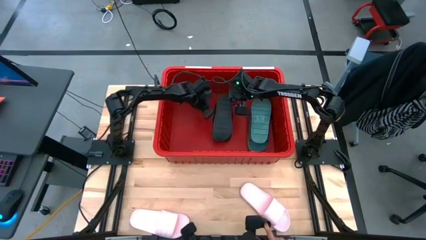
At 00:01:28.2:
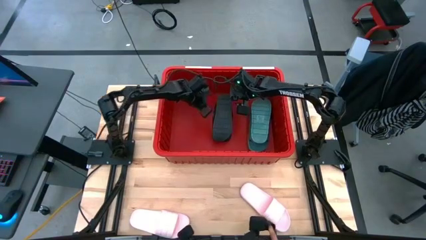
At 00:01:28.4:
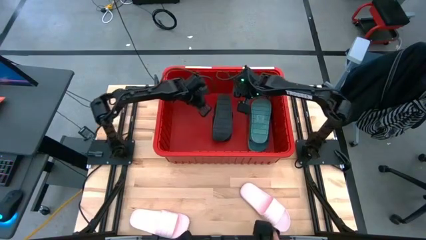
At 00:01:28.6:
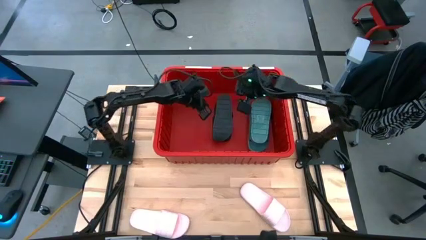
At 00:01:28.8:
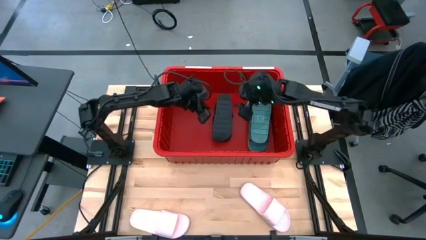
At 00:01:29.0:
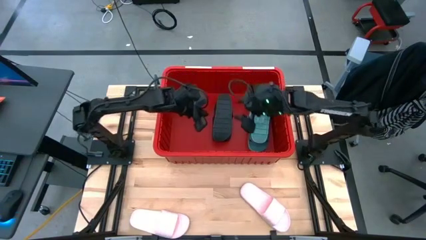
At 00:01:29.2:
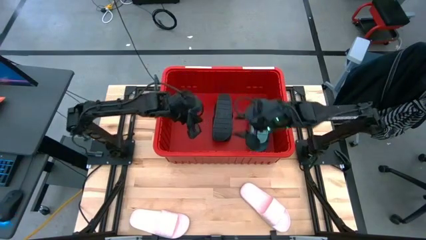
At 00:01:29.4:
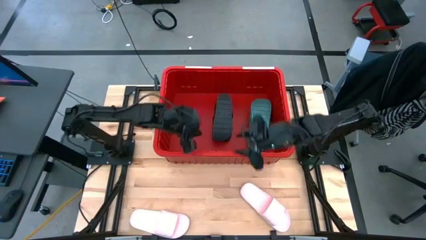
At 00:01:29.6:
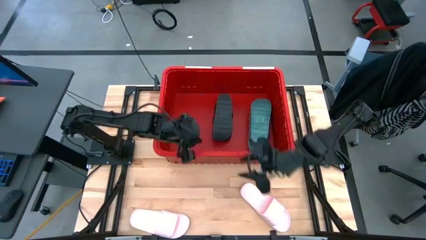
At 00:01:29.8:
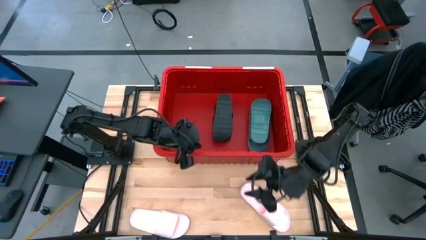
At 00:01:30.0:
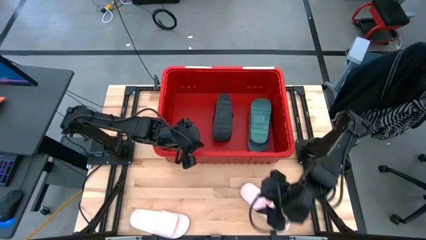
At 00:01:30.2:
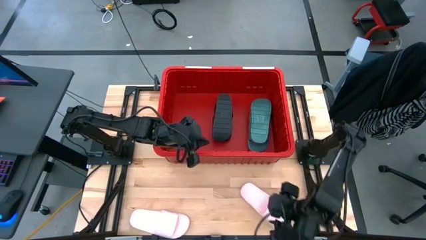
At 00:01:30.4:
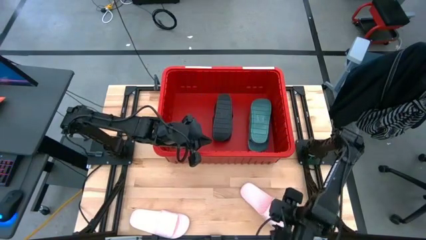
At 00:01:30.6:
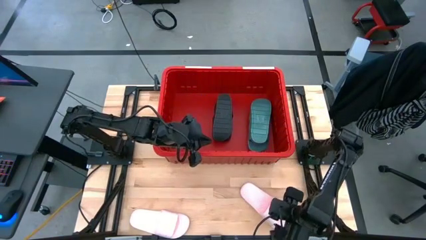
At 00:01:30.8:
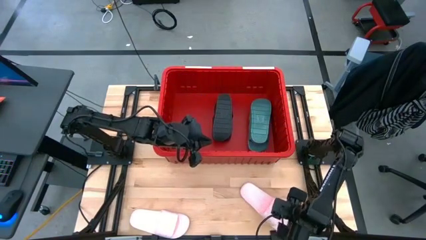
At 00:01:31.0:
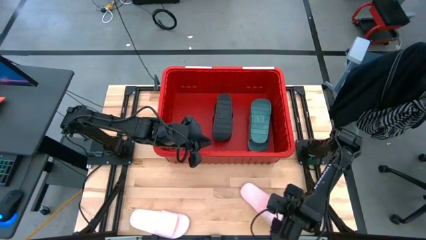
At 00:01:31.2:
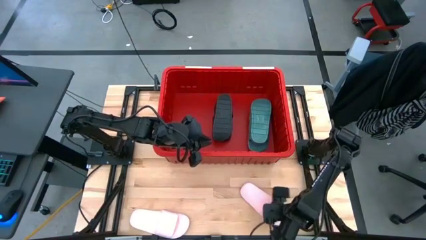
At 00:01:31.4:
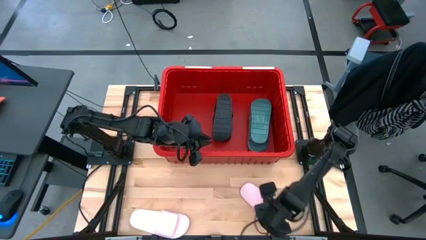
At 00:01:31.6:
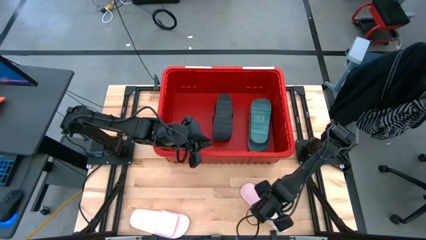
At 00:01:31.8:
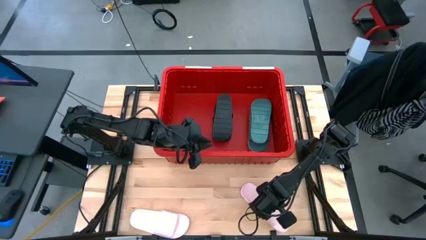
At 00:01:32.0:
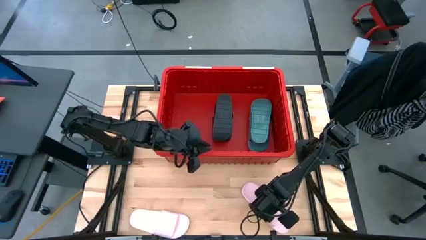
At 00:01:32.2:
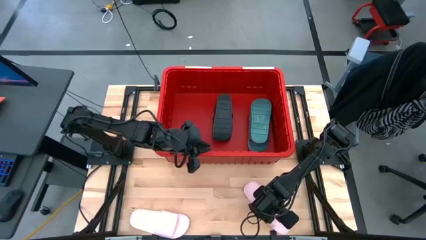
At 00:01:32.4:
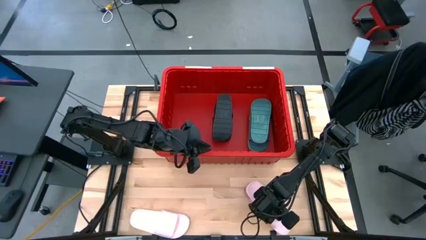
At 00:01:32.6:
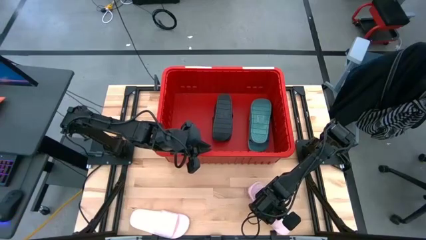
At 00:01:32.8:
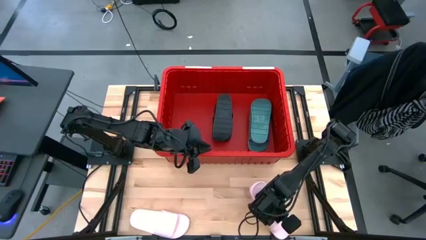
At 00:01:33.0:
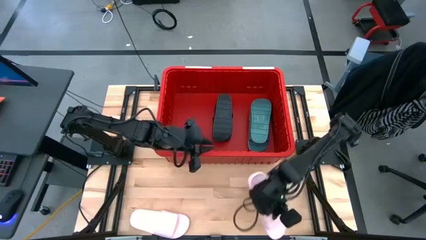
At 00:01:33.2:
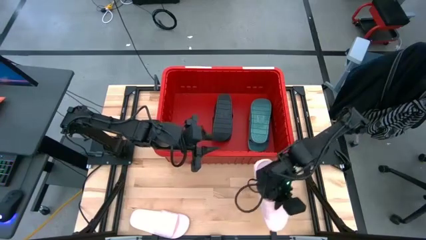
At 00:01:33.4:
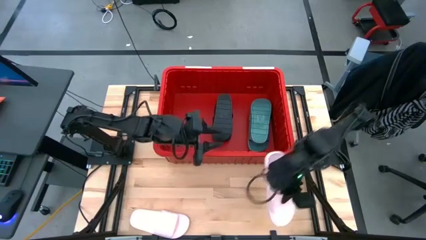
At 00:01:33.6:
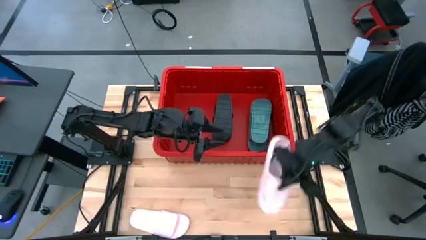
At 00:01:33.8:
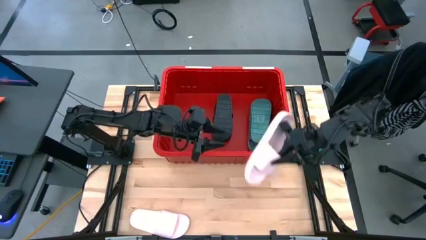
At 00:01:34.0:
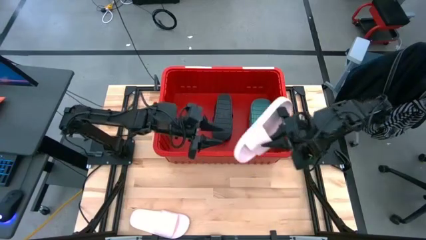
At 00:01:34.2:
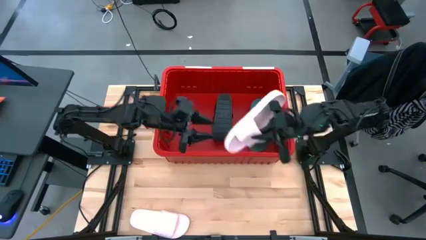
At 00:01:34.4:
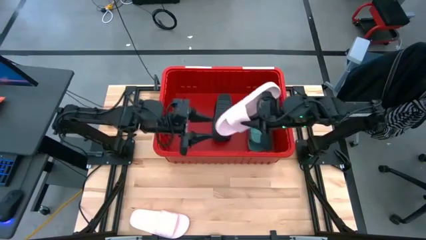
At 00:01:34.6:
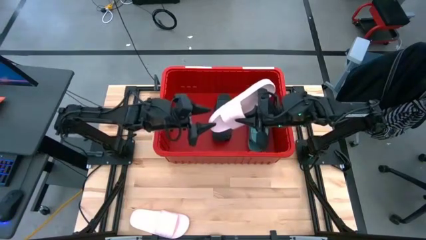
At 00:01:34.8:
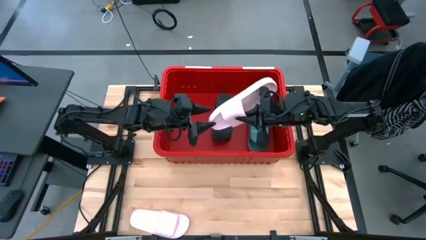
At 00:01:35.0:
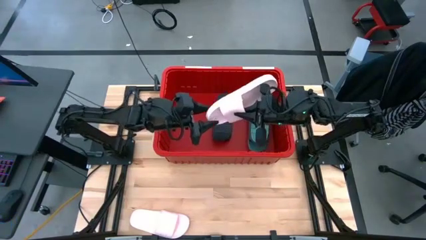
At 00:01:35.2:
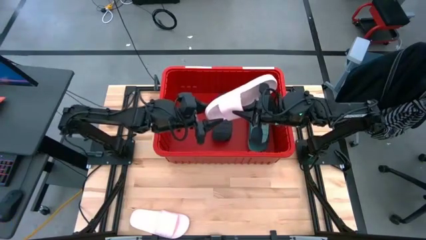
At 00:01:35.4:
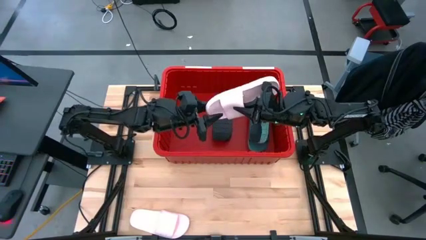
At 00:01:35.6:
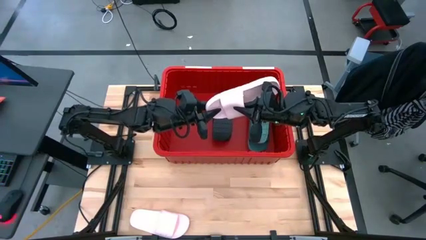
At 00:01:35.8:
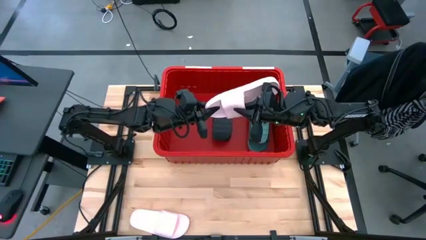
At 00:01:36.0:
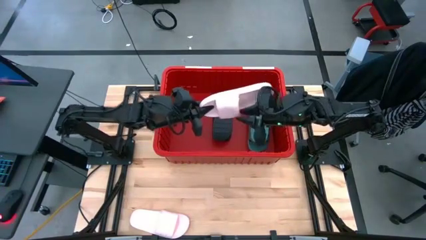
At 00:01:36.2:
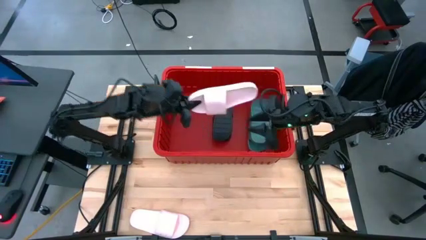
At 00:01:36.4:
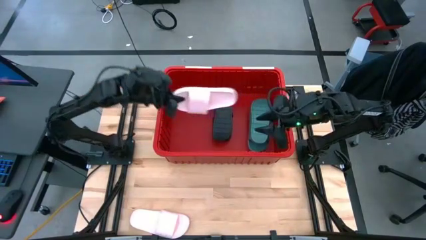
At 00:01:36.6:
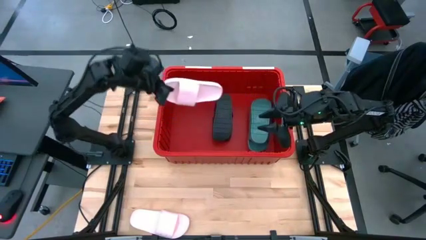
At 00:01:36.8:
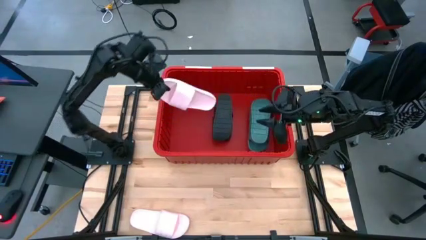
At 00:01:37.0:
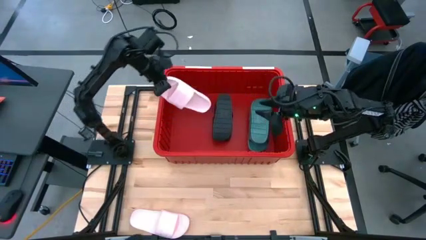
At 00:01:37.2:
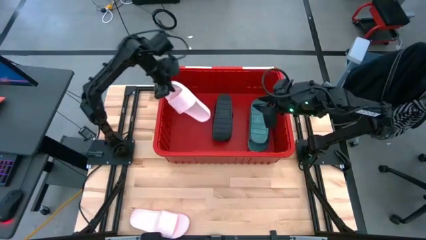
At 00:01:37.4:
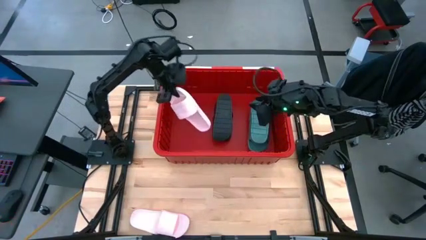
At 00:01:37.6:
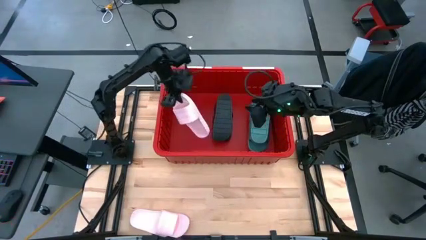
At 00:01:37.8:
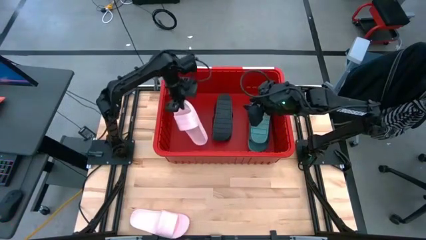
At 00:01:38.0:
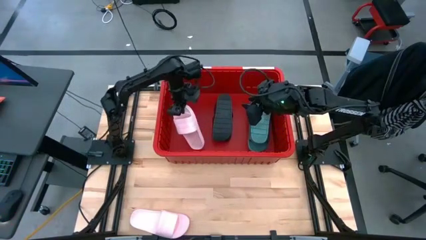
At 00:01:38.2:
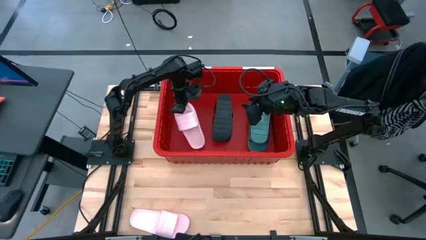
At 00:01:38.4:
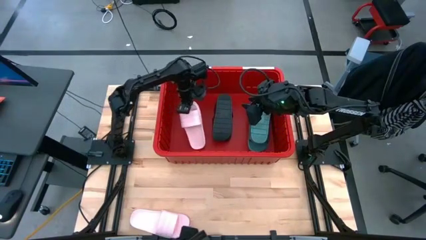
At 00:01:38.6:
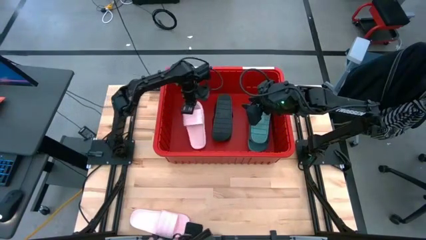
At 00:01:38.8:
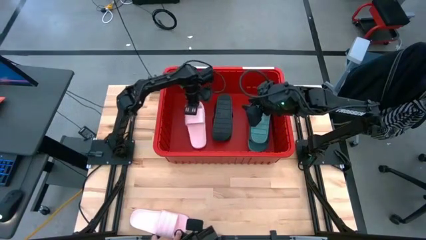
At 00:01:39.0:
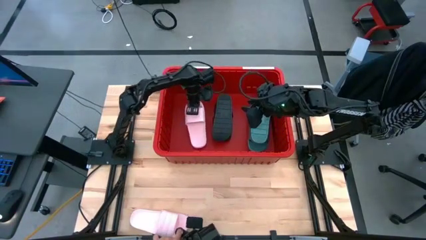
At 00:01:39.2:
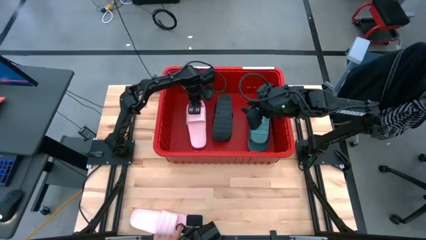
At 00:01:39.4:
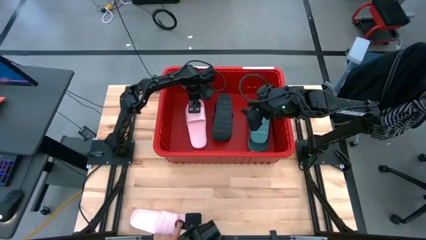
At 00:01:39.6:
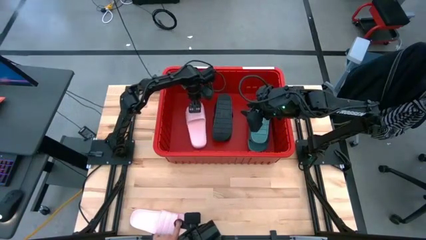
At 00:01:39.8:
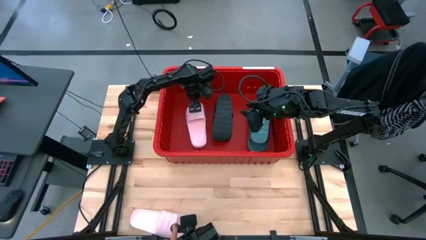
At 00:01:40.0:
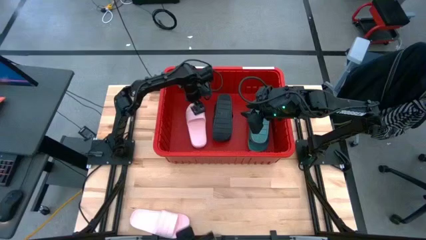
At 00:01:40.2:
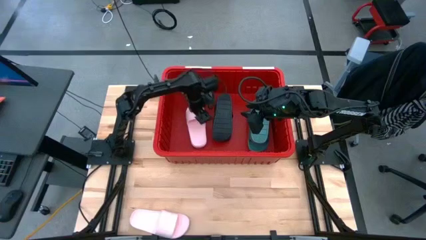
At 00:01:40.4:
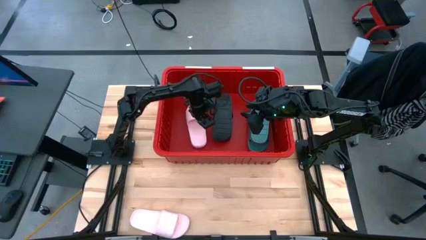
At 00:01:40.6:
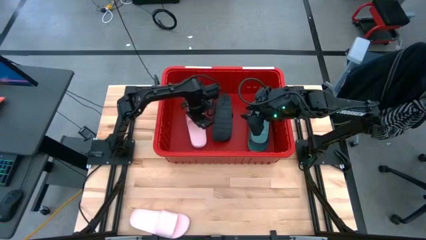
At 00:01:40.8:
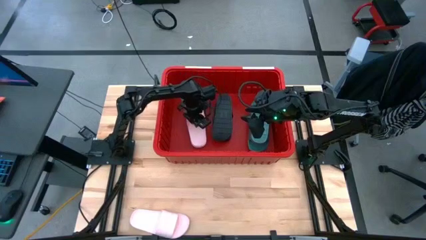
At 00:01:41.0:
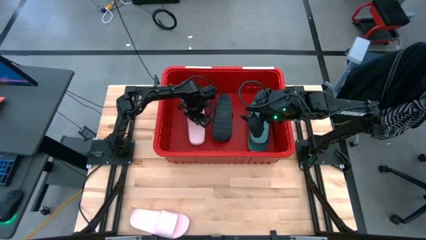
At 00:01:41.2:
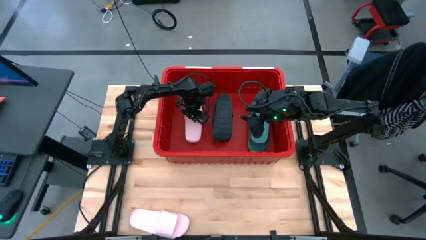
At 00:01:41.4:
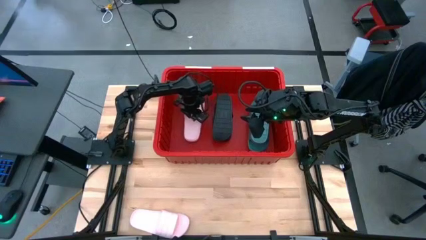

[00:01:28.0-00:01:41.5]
Task: Pick and place slides into bin
Put the right pink slides into the red bin

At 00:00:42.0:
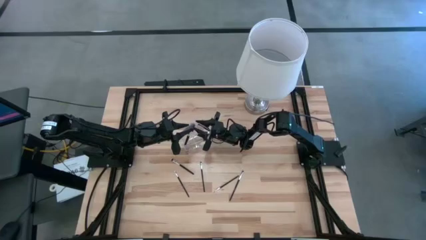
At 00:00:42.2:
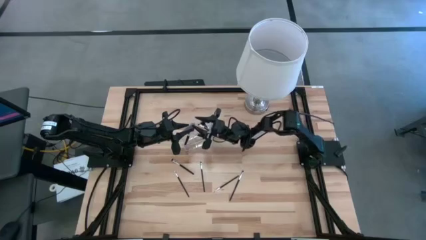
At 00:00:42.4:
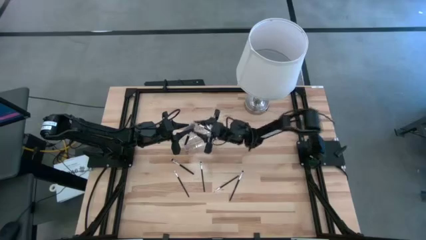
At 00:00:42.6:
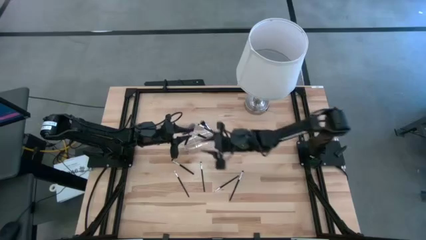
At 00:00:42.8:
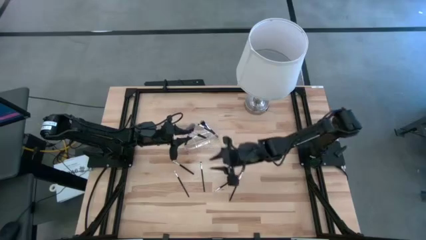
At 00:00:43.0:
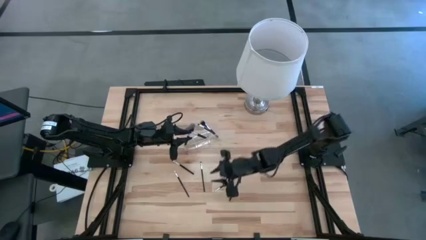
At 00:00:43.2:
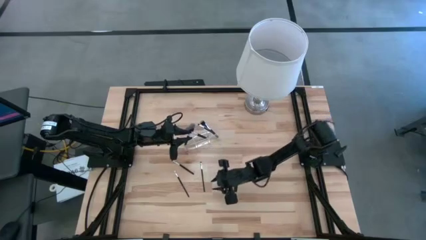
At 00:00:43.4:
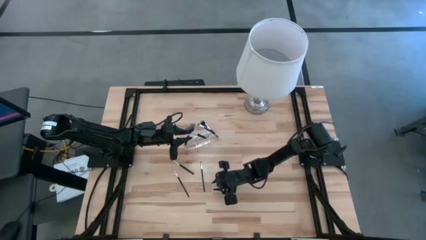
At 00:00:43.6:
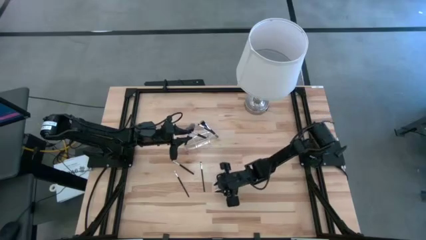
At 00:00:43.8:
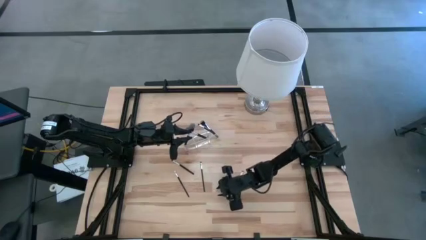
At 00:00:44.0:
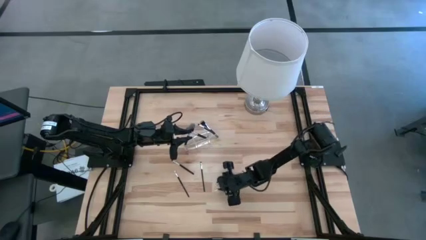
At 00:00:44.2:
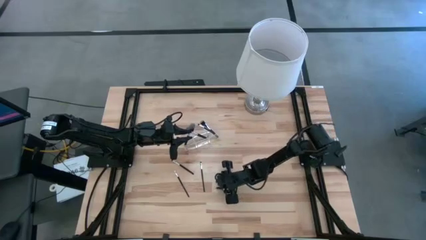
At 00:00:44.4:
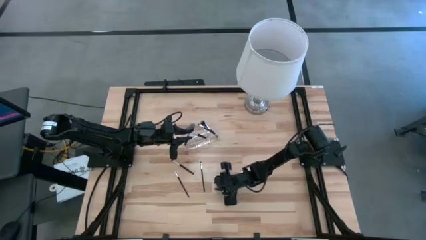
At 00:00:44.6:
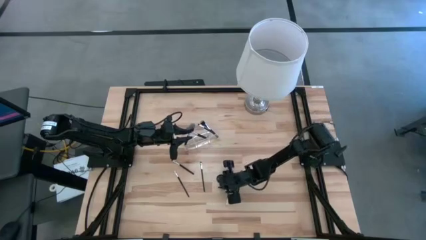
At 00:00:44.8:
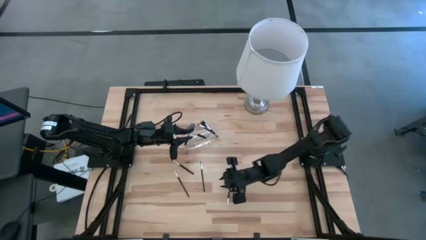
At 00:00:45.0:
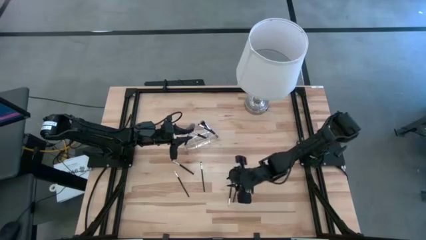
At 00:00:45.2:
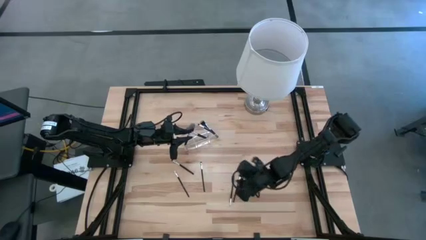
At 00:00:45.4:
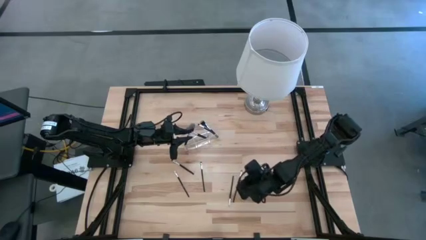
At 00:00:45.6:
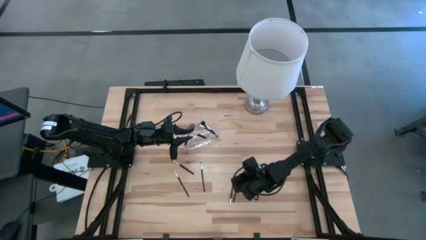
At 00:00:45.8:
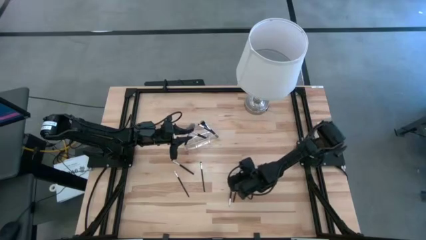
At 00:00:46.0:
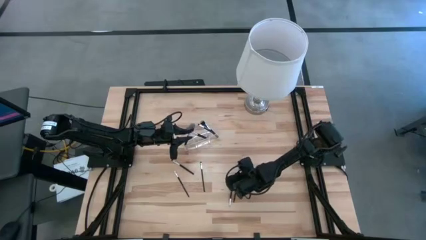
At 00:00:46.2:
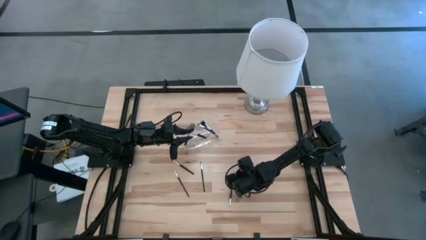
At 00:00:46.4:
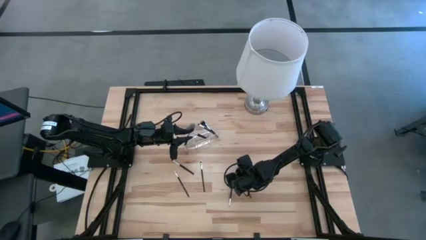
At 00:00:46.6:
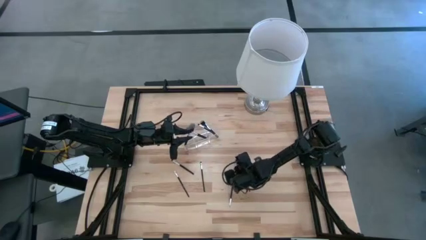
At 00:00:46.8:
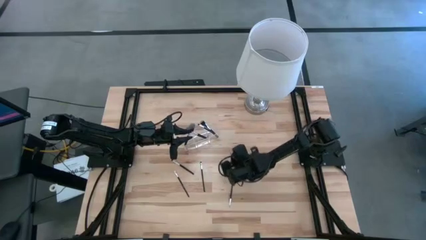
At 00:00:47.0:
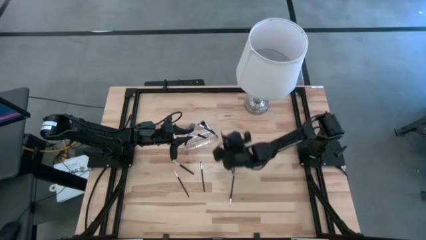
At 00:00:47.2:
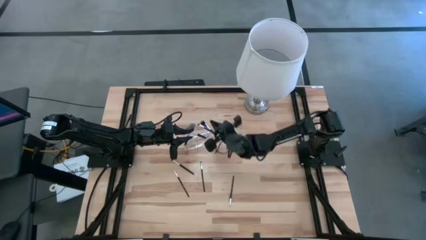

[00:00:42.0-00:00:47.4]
Task: Put items in baskets/containers
Put the right foundation brush into the left transparent organizer
